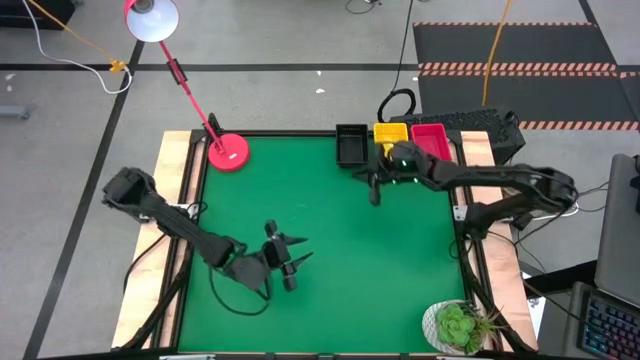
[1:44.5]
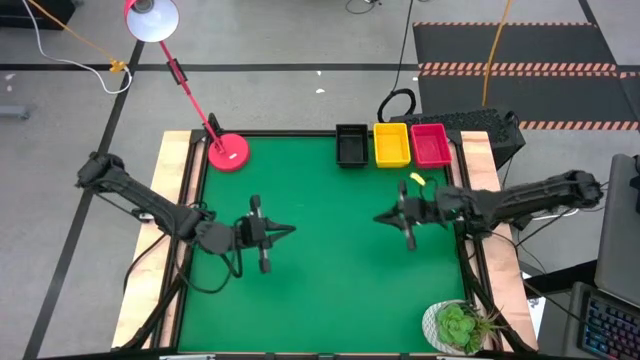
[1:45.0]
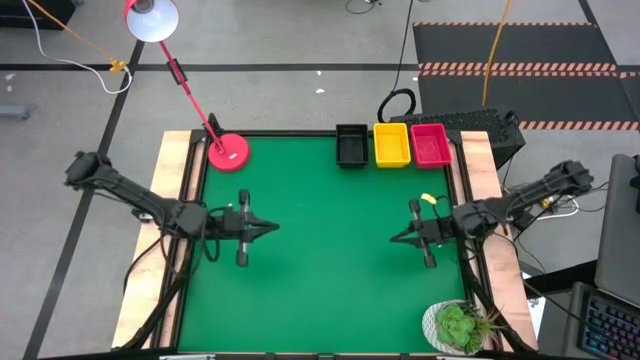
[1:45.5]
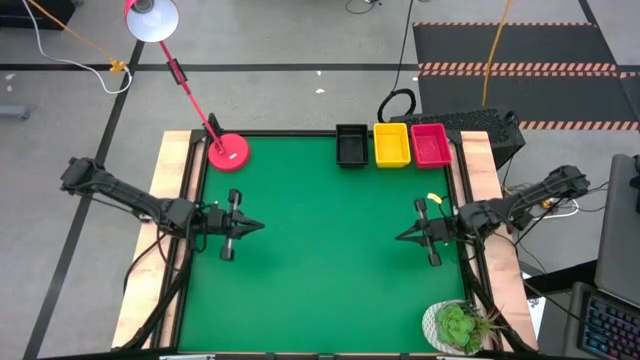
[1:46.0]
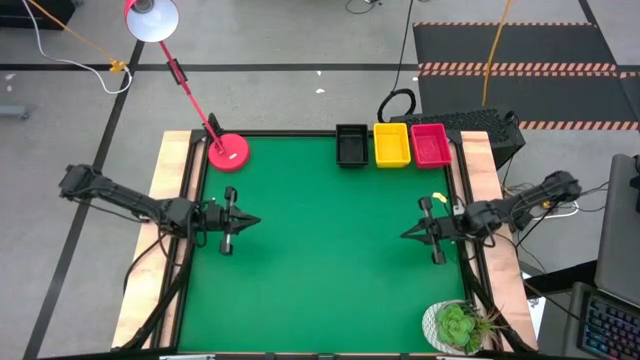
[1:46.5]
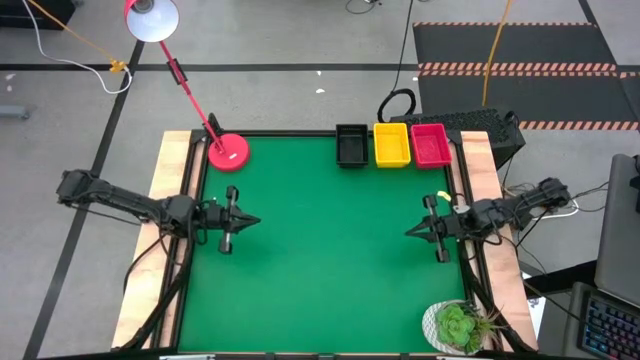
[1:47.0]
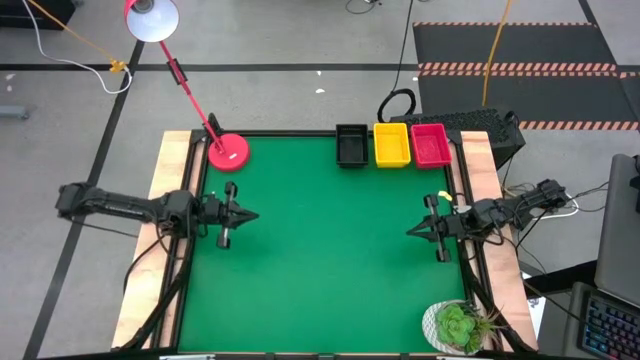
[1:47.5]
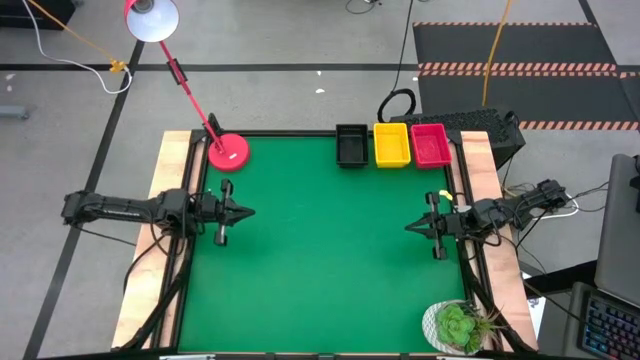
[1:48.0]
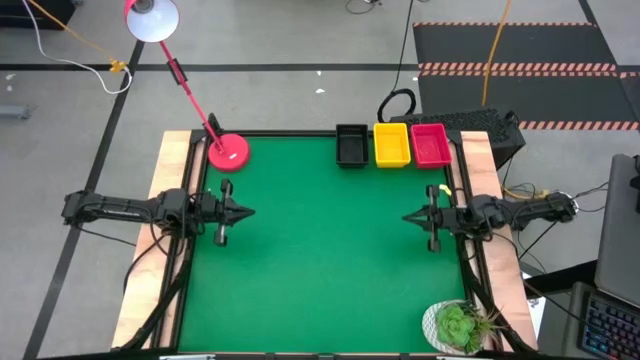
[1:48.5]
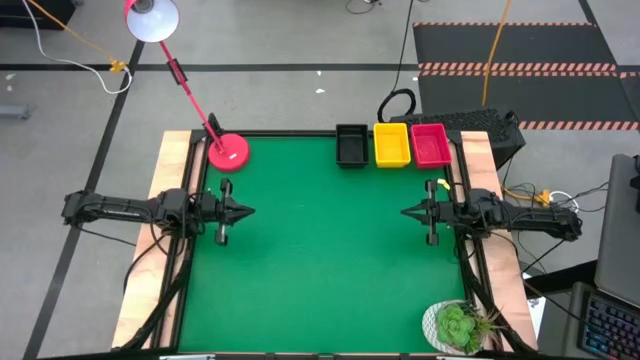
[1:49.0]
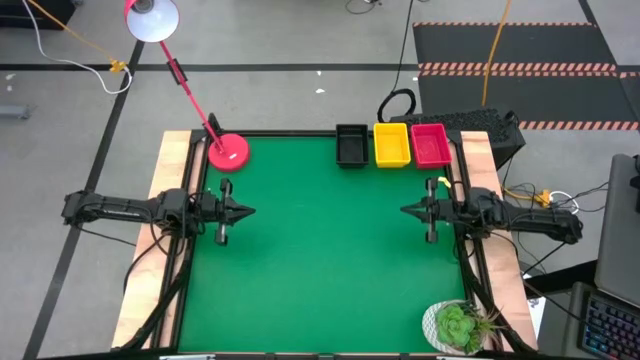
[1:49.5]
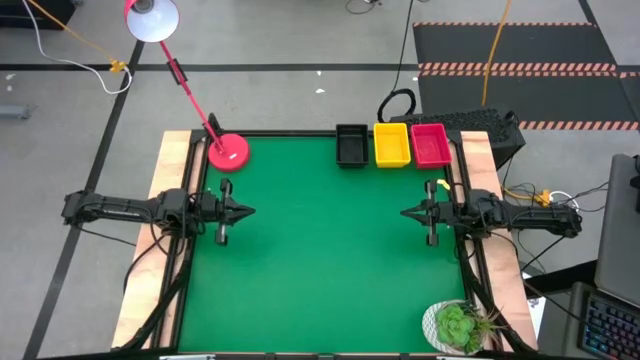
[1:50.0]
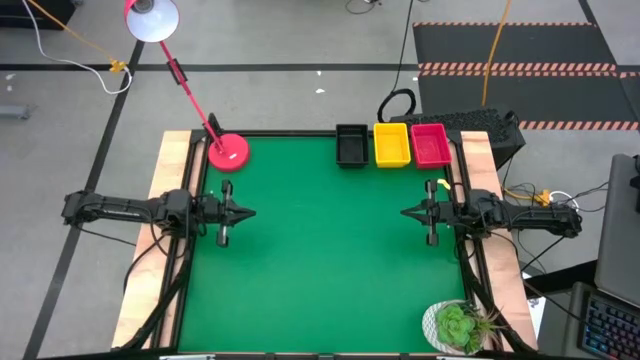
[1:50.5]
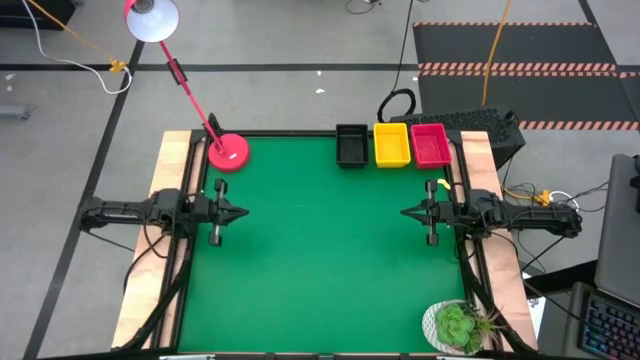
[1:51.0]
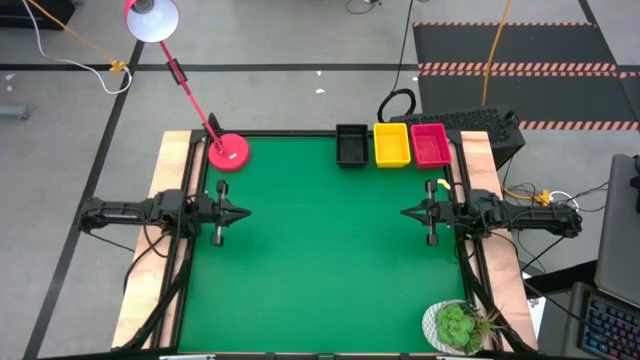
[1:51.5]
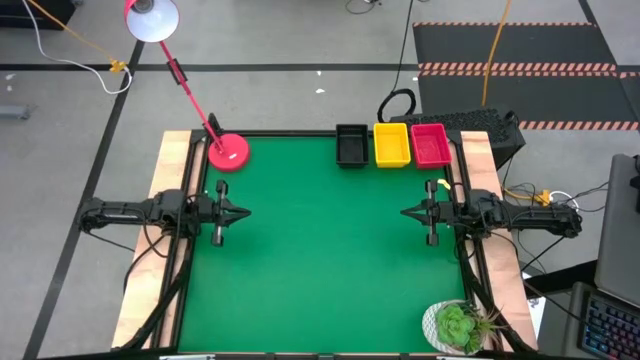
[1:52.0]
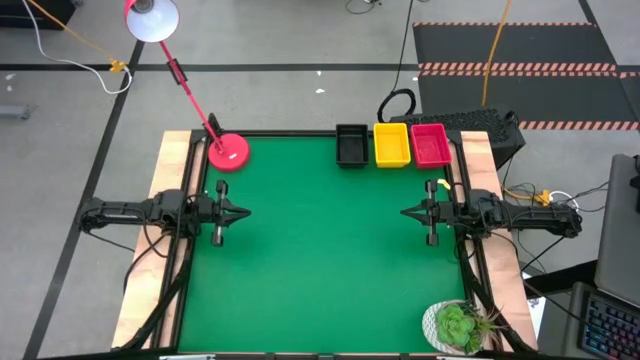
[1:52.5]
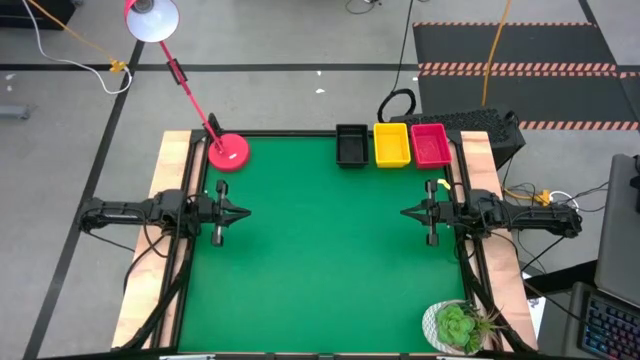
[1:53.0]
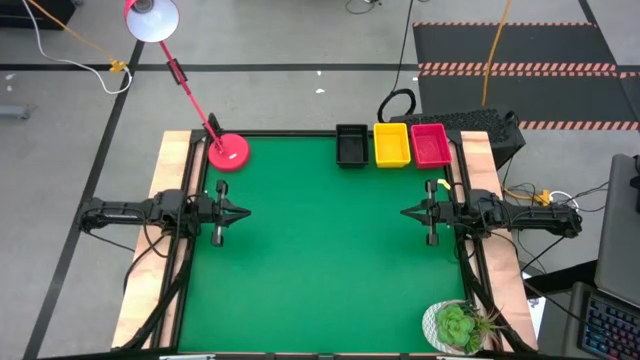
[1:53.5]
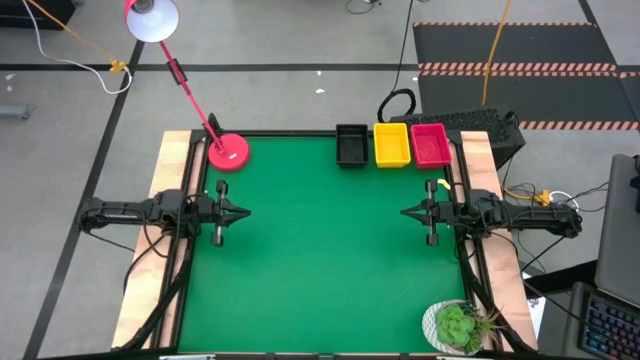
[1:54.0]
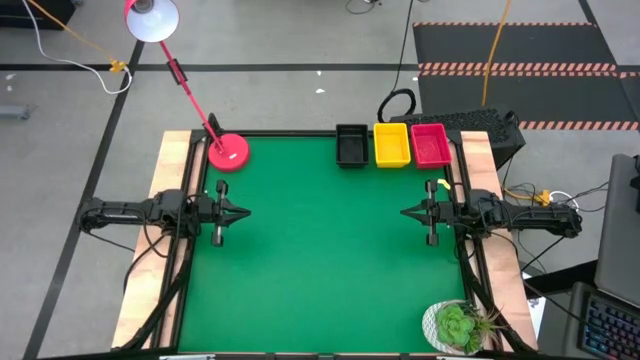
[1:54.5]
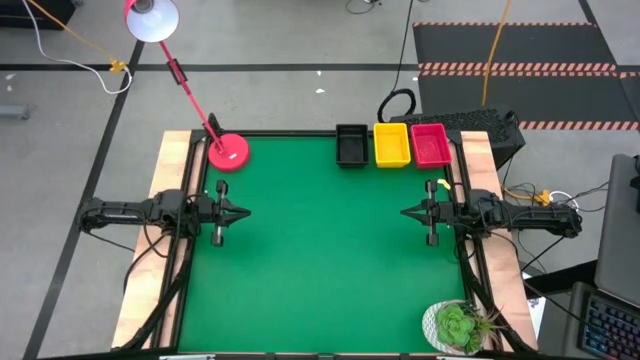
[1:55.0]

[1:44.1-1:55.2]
Return to Home Position

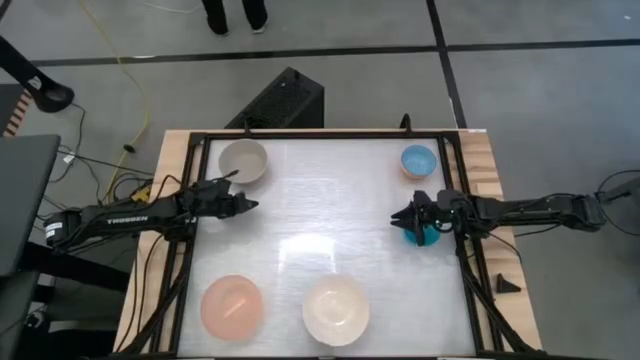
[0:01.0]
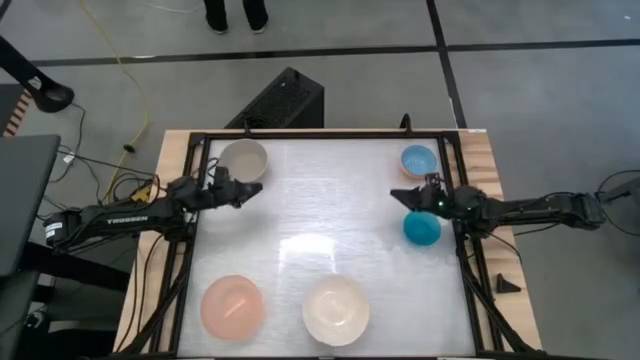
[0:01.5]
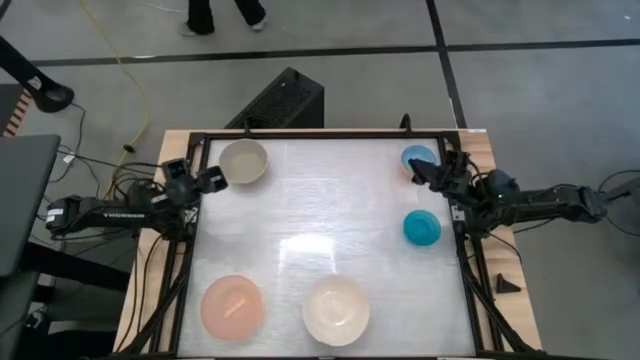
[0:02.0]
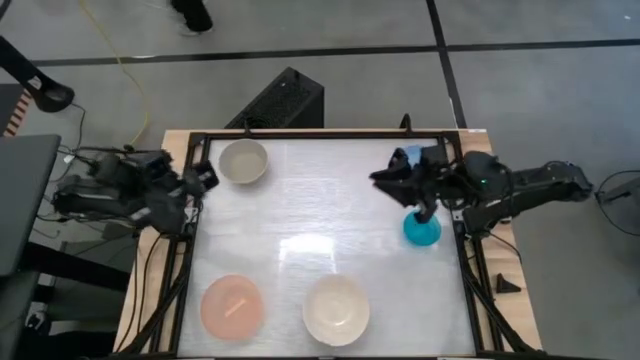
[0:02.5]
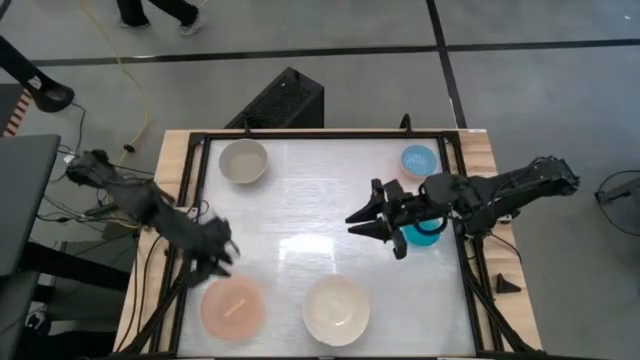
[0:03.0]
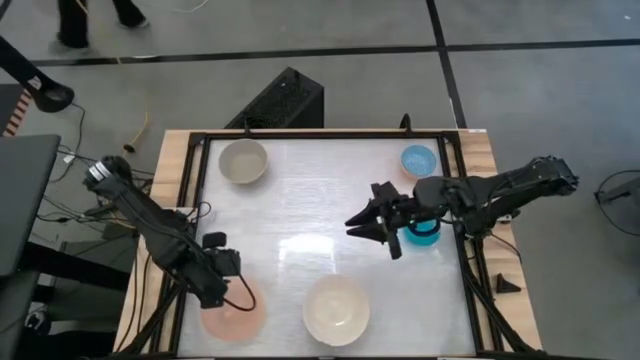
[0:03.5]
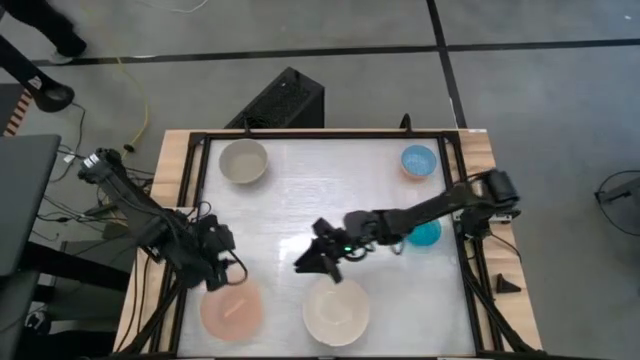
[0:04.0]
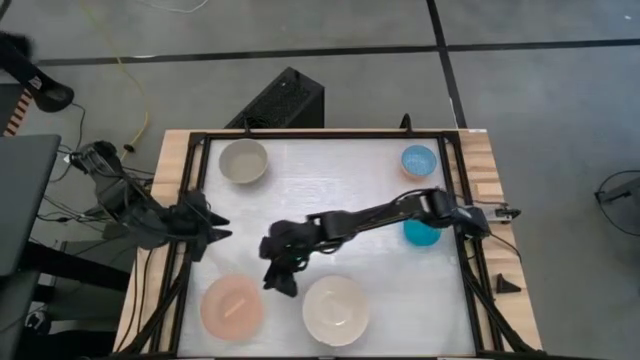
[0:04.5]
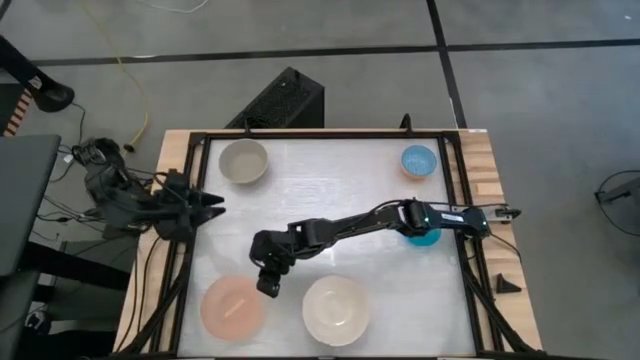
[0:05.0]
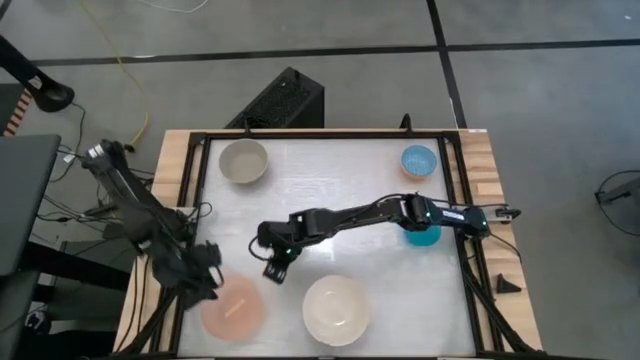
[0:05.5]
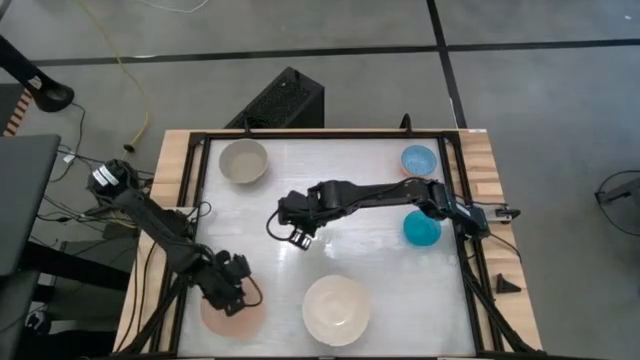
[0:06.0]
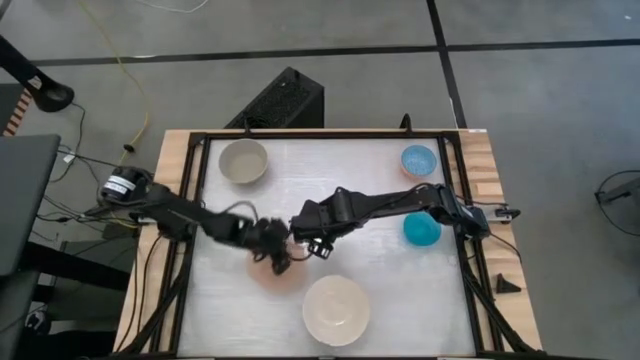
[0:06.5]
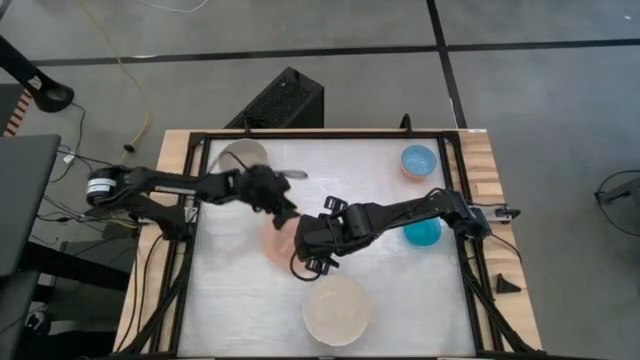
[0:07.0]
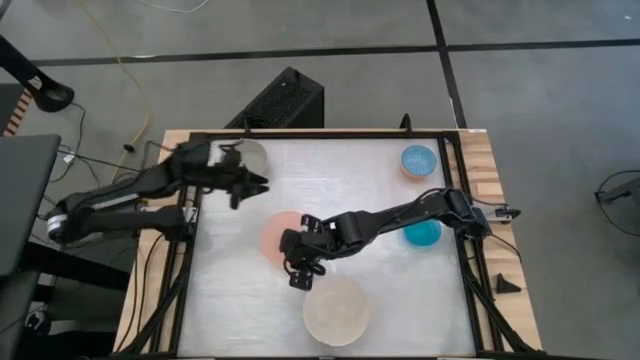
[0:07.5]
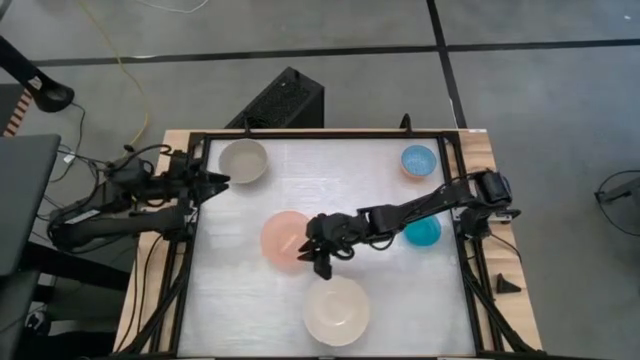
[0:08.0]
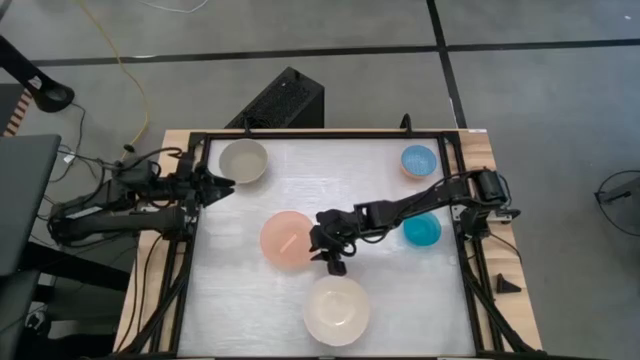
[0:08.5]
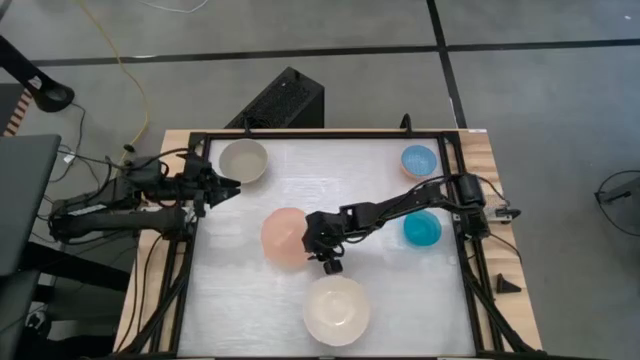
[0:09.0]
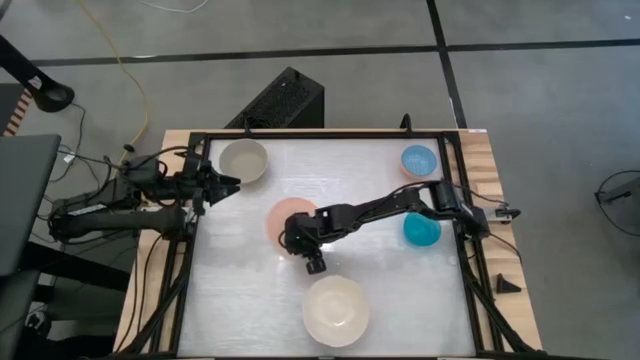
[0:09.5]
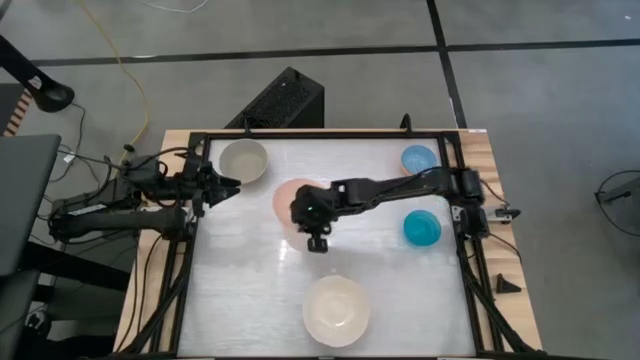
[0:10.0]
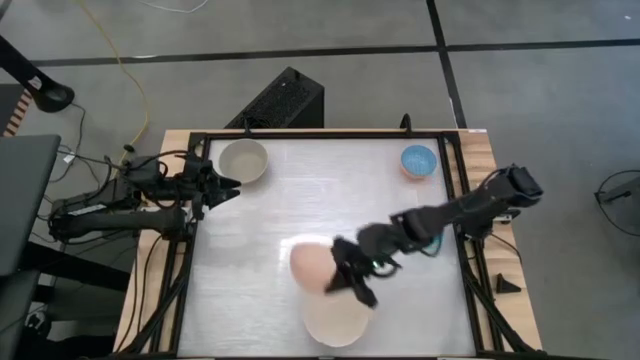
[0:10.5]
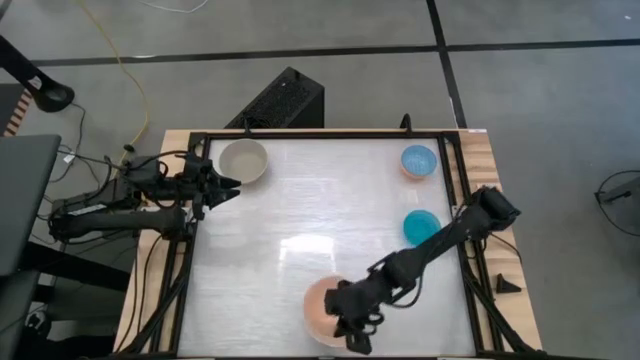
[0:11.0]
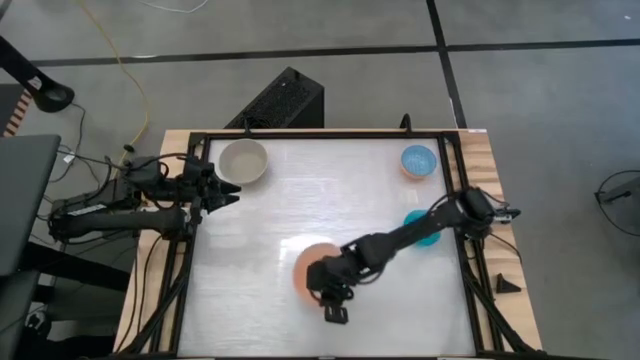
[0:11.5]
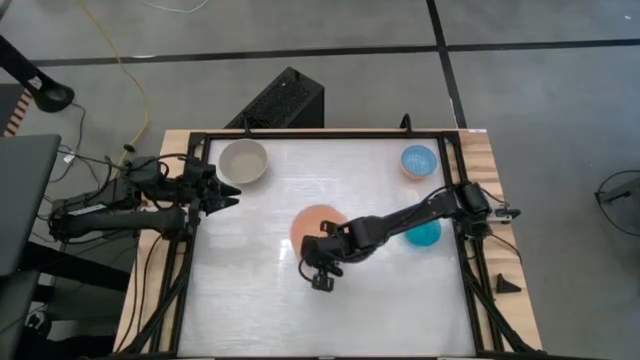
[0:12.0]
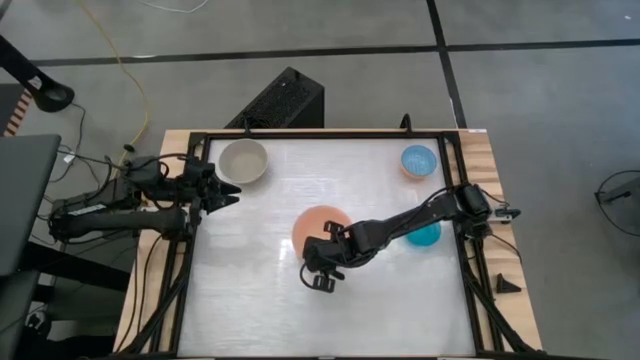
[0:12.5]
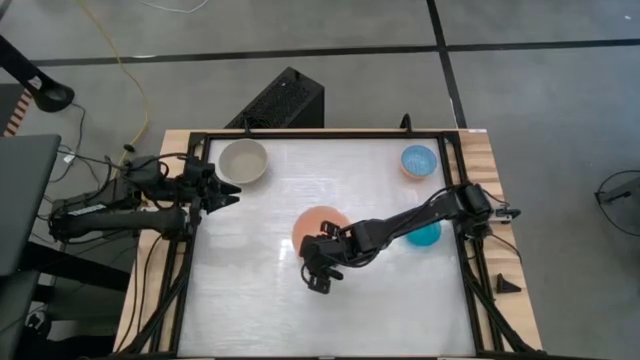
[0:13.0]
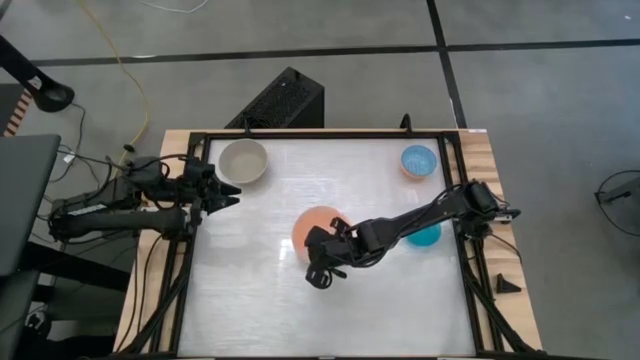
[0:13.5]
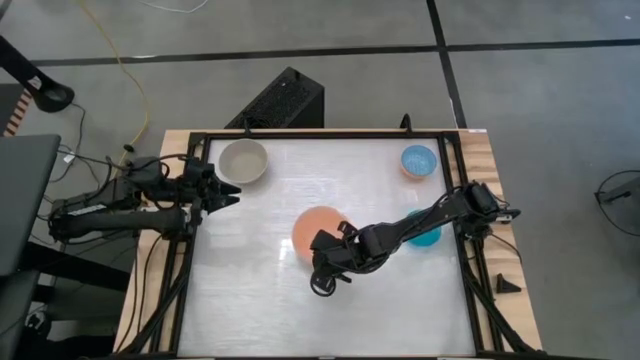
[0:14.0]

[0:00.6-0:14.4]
Stack the orange bowl on top of the white bowl
